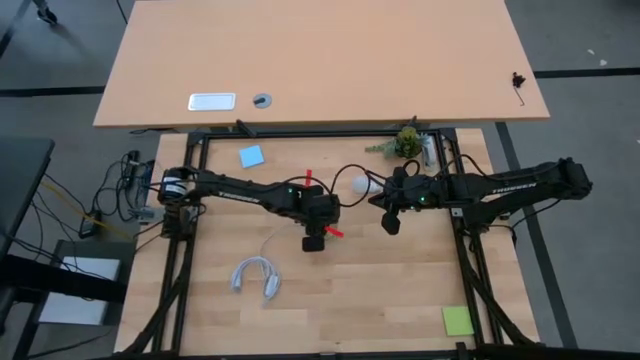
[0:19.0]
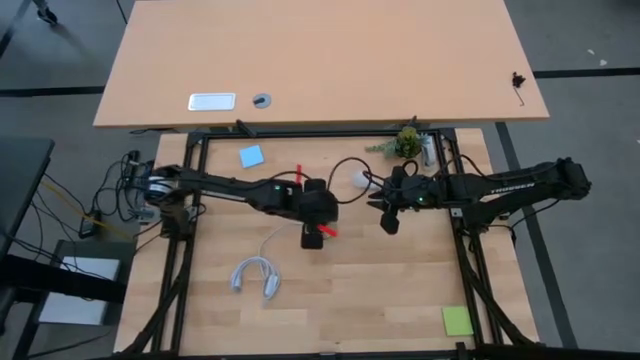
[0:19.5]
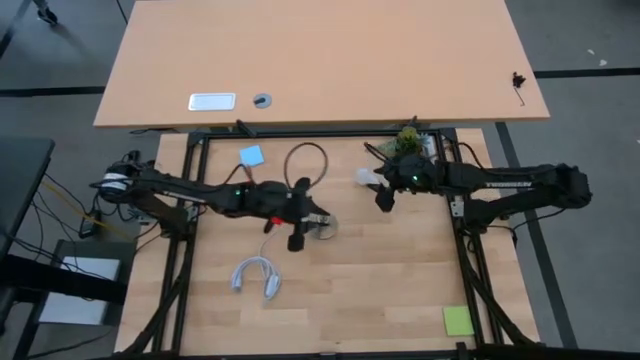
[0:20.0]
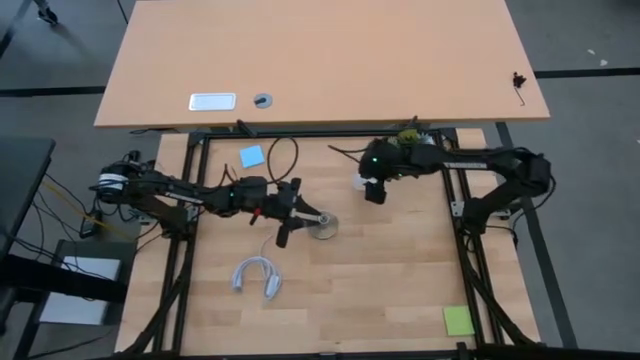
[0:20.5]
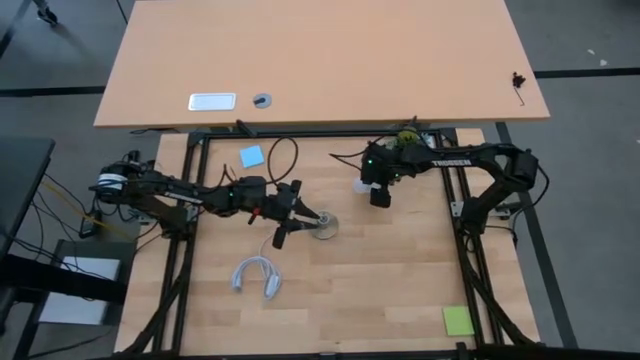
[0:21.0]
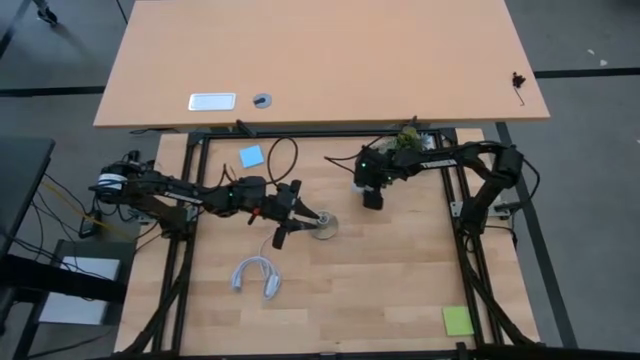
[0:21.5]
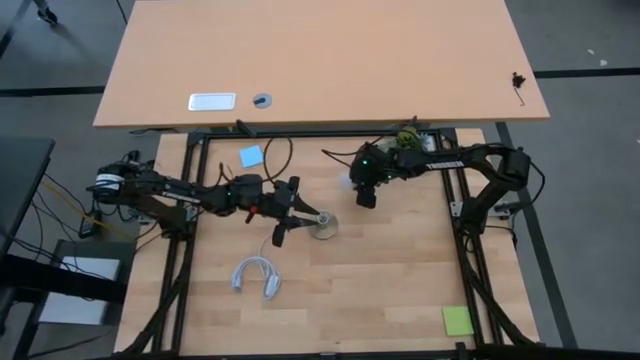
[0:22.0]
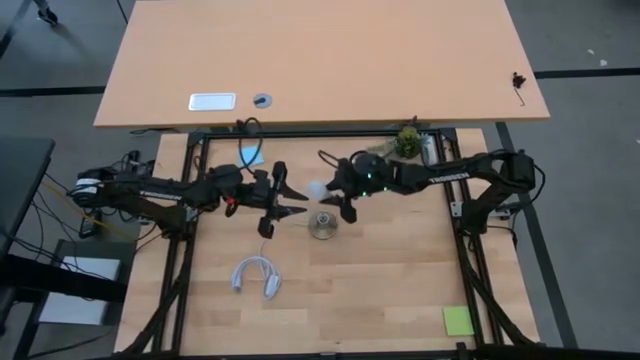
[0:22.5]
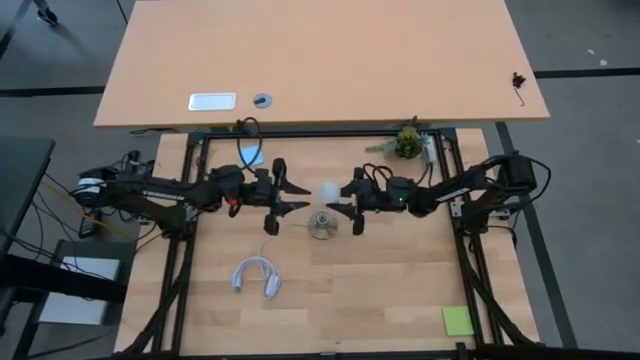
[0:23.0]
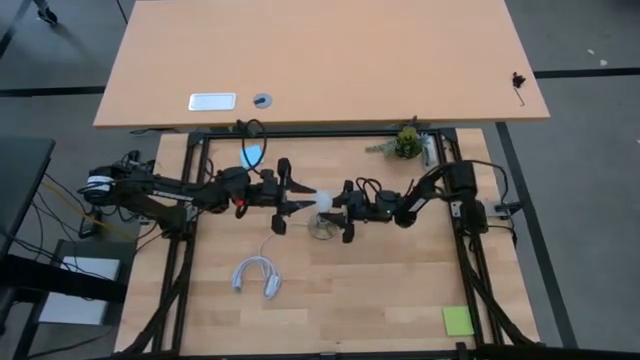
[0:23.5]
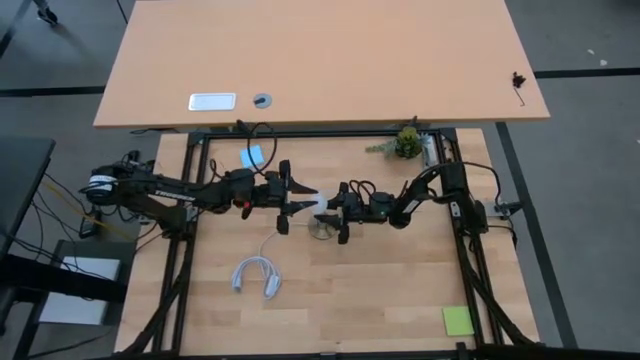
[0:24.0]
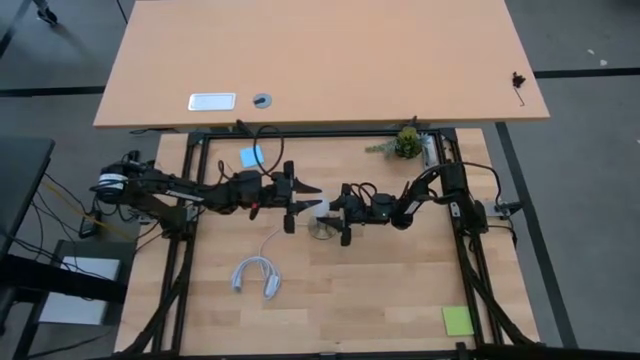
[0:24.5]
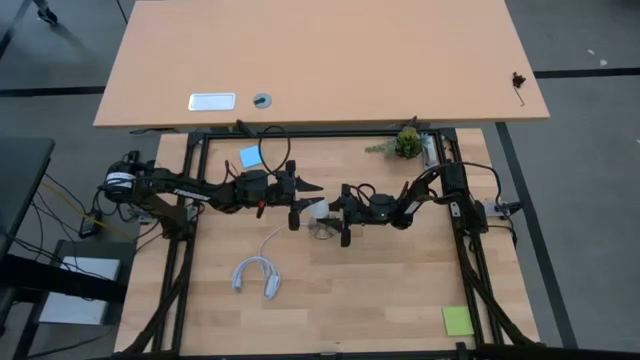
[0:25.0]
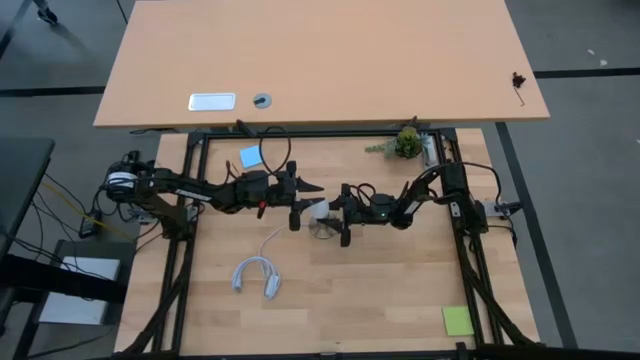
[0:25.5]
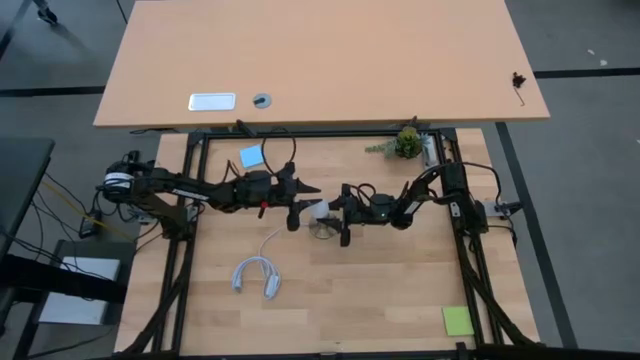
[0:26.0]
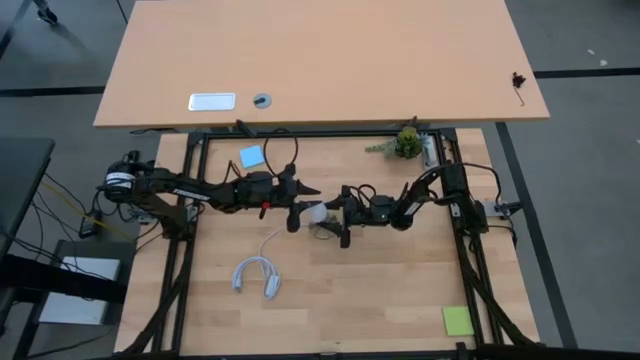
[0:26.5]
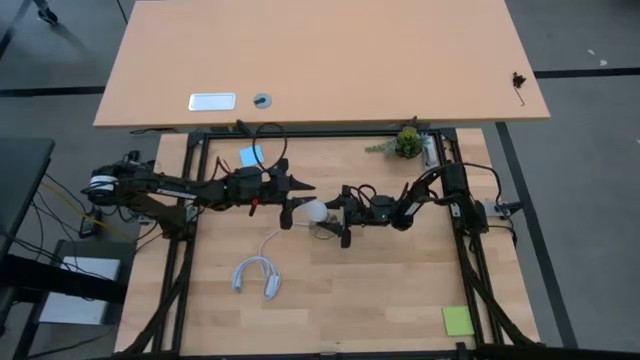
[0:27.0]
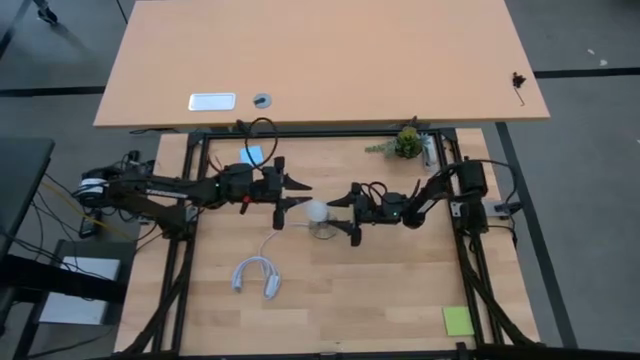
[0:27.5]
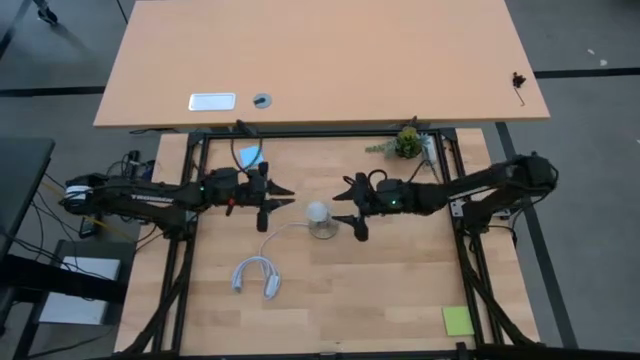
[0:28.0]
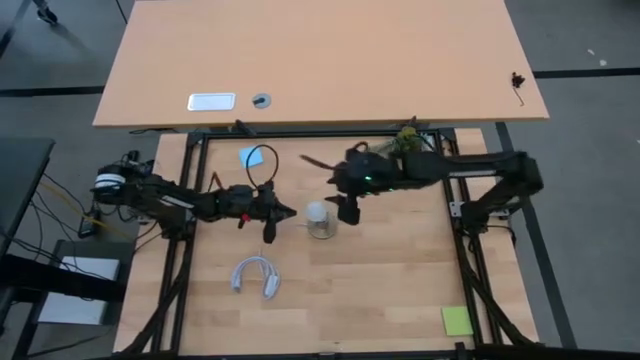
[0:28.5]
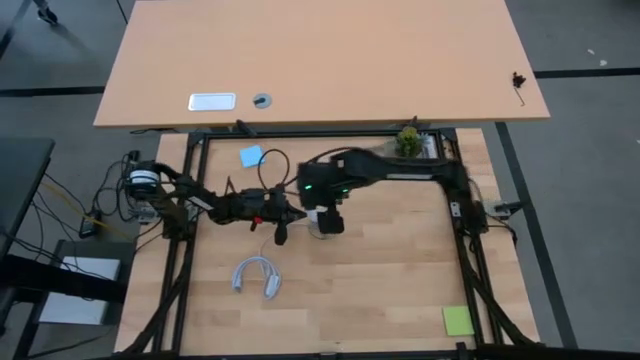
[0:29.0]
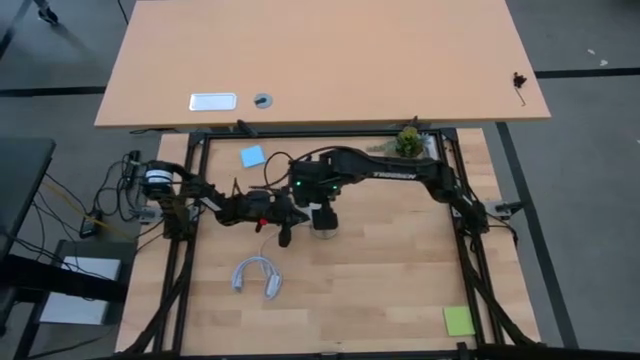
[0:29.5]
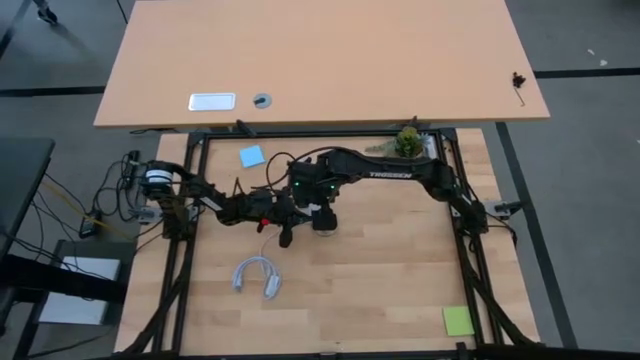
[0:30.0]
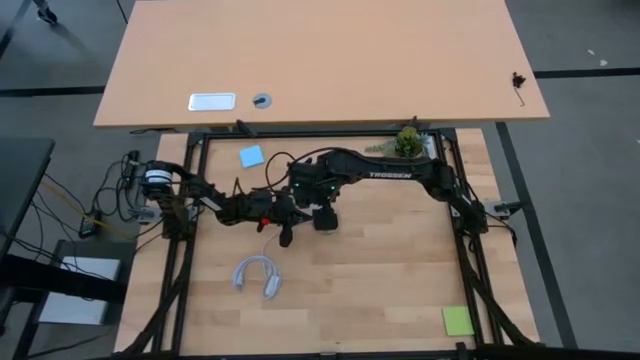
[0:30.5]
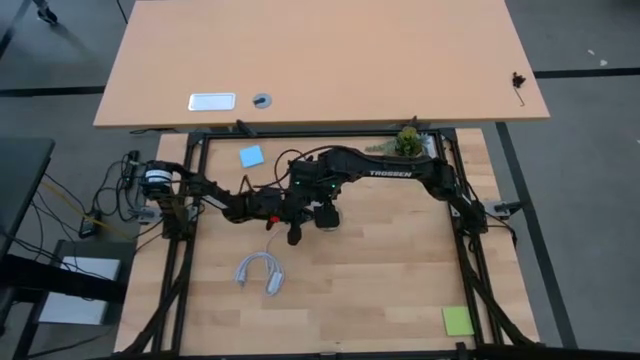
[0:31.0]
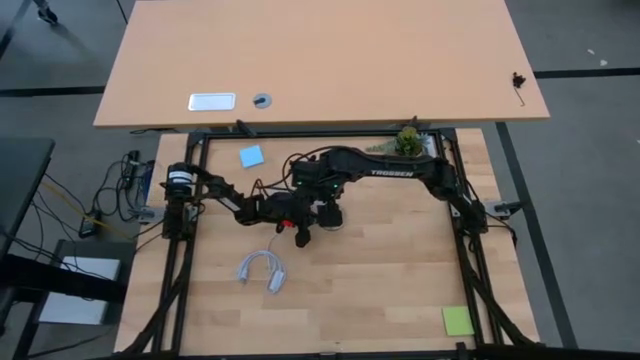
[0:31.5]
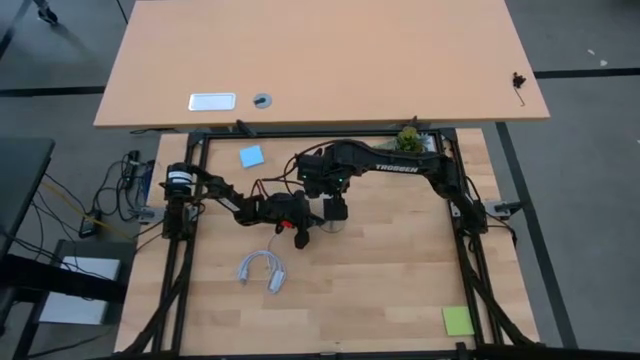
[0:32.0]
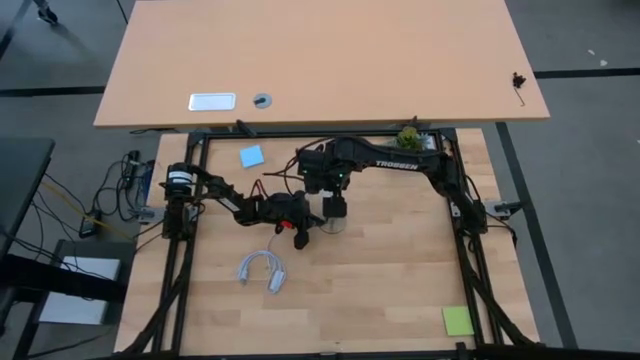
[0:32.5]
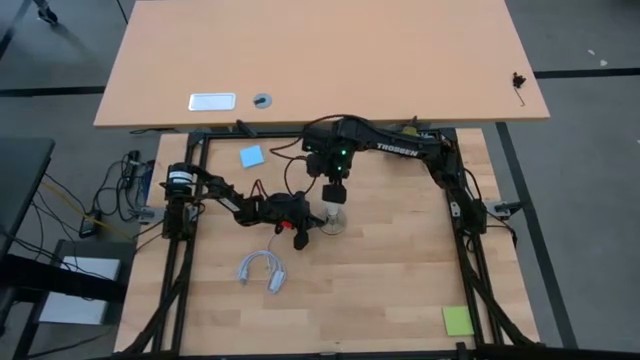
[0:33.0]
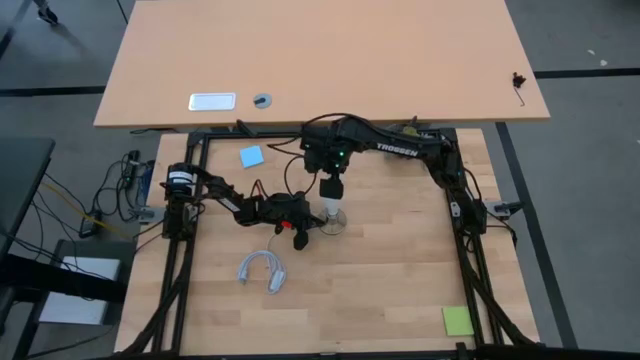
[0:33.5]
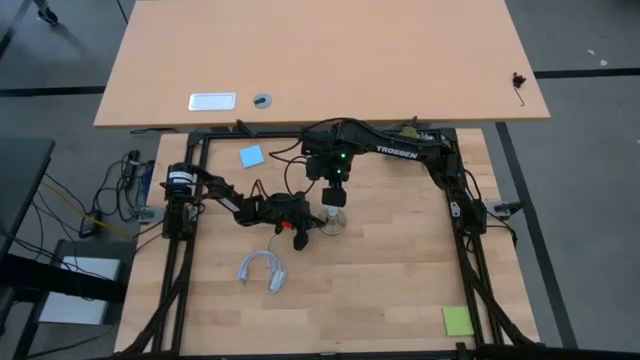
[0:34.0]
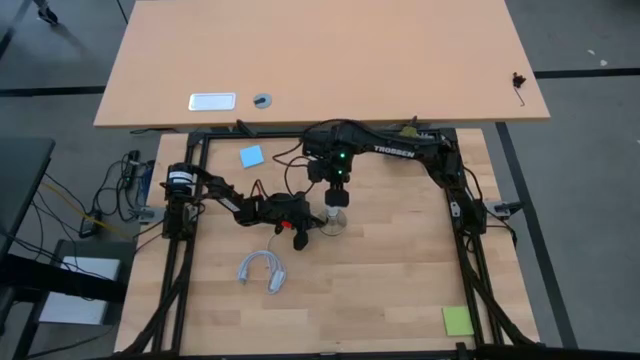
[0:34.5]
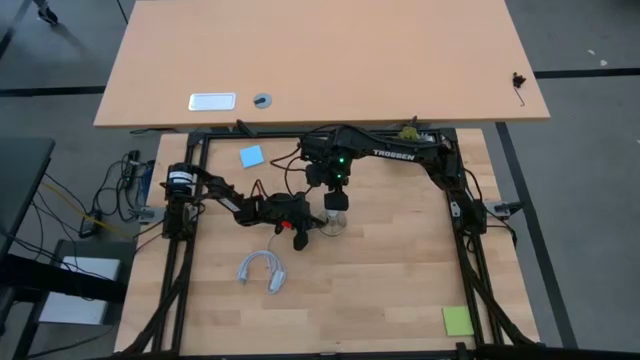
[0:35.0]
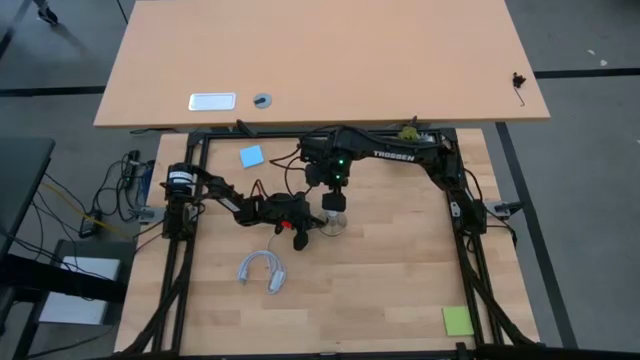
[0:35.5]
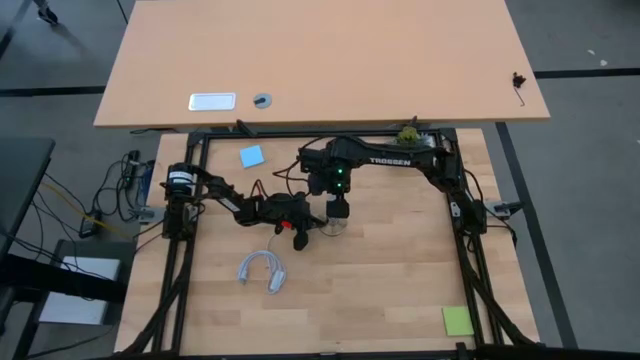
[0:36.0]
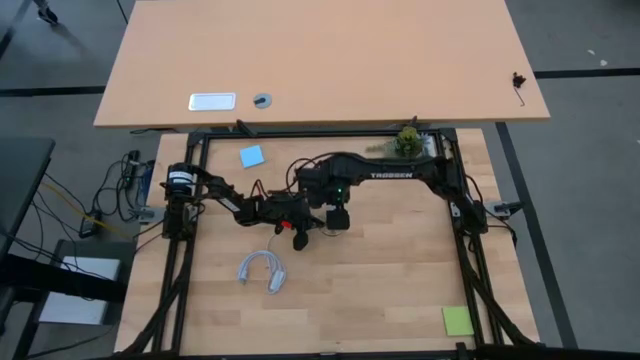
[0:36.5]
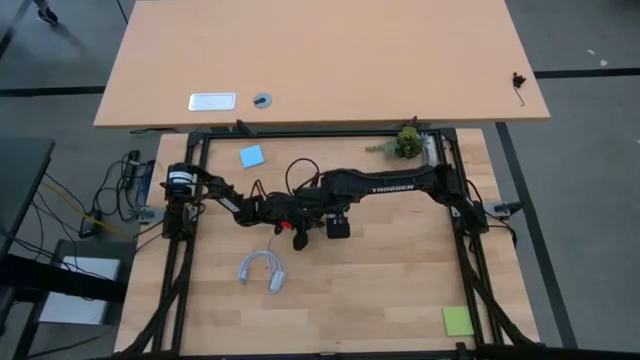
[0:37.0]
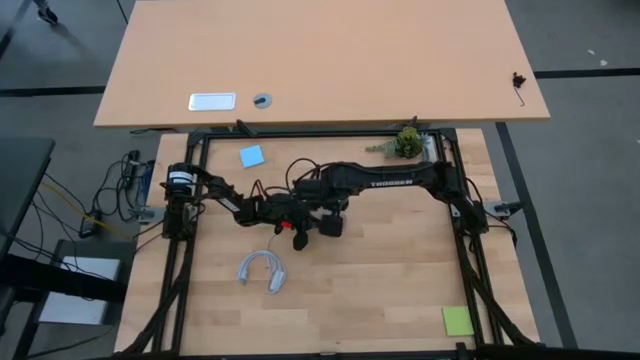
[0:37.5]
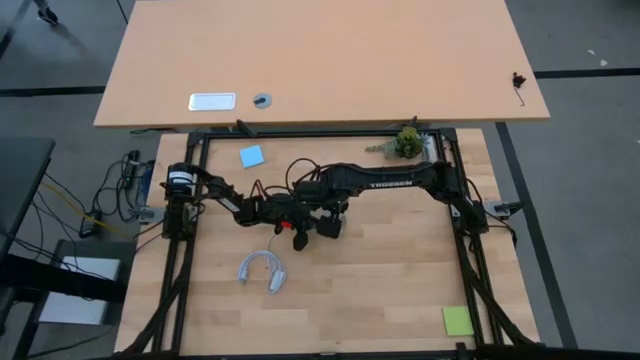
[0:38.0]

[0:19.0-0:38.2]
Task: Screw lightbulb
Insert the light bulb into the lamp
